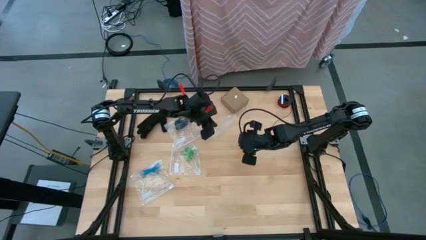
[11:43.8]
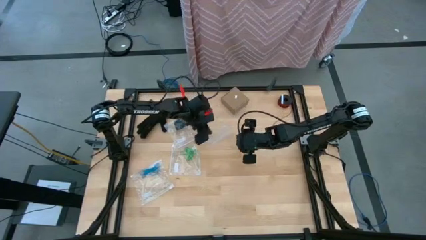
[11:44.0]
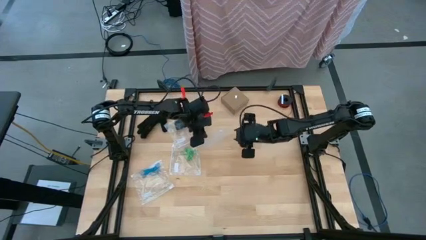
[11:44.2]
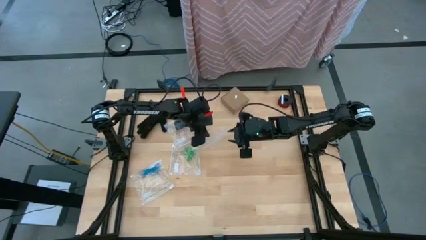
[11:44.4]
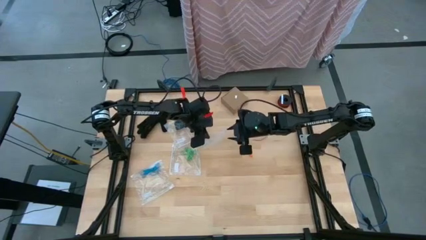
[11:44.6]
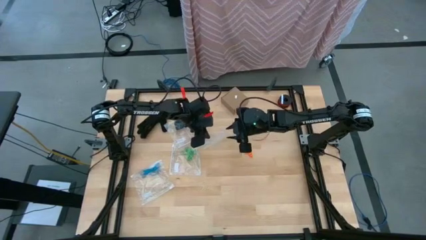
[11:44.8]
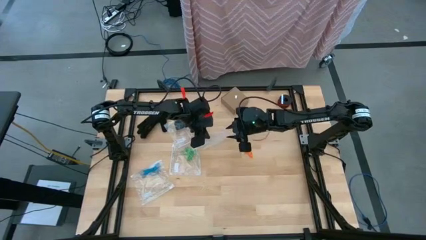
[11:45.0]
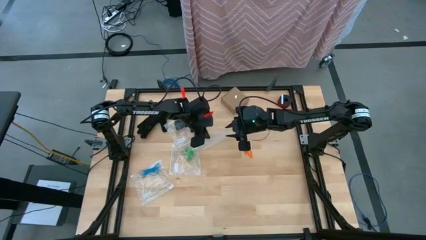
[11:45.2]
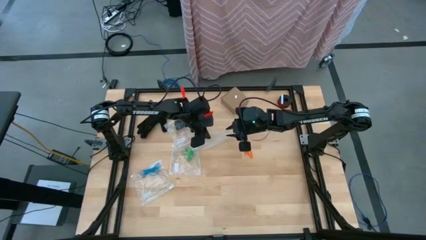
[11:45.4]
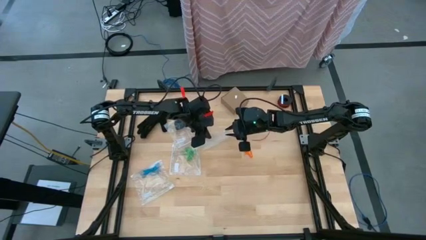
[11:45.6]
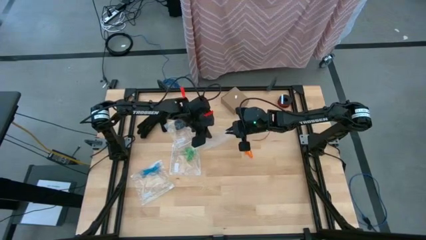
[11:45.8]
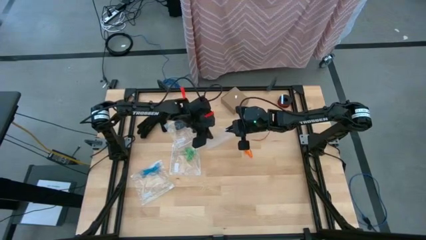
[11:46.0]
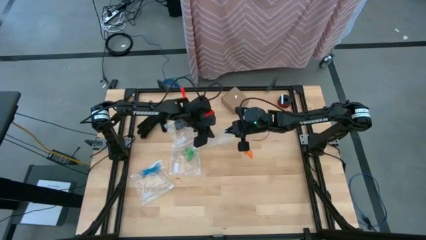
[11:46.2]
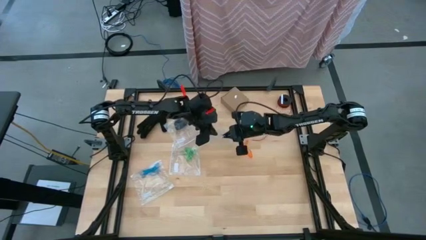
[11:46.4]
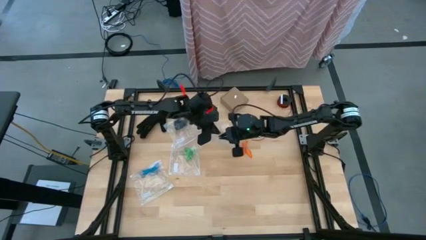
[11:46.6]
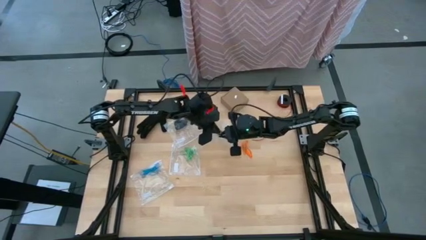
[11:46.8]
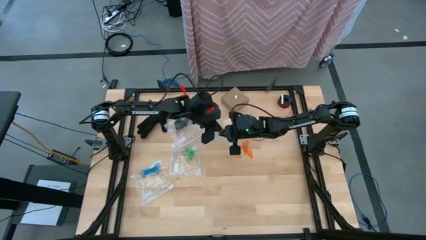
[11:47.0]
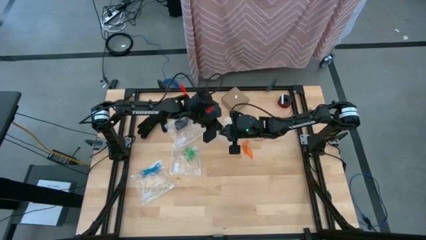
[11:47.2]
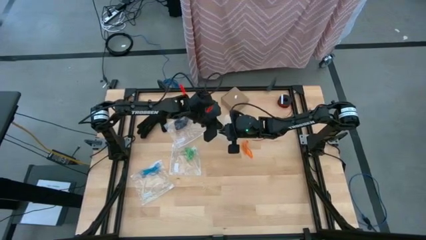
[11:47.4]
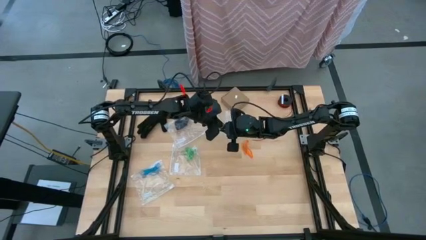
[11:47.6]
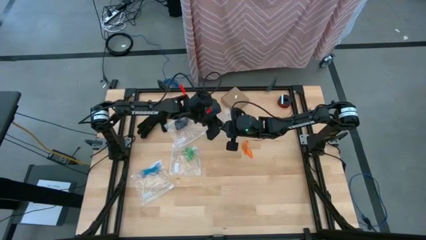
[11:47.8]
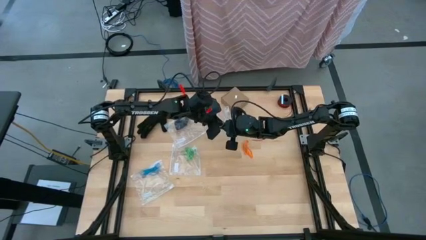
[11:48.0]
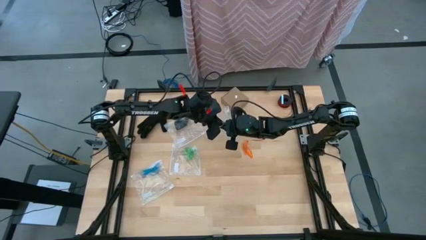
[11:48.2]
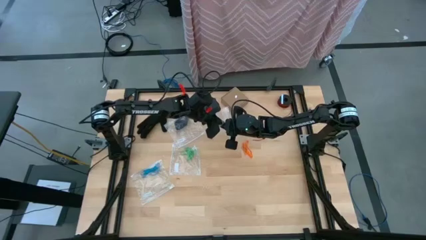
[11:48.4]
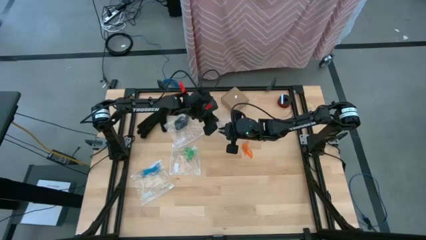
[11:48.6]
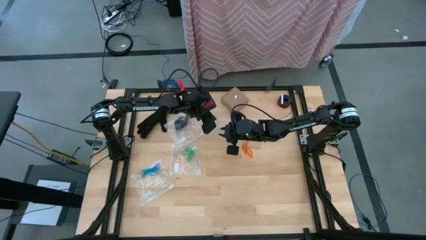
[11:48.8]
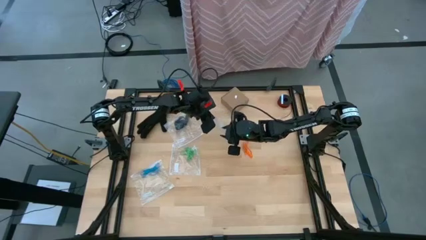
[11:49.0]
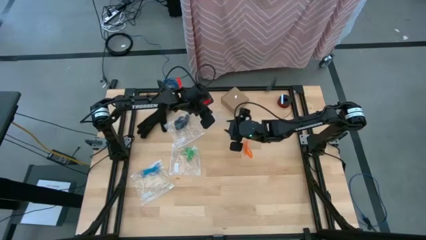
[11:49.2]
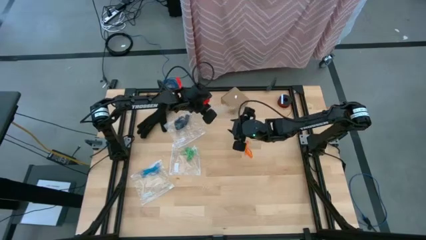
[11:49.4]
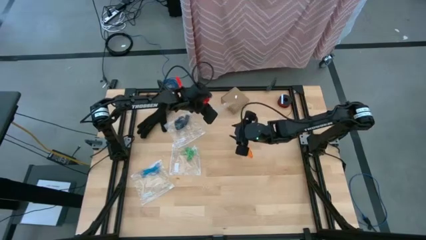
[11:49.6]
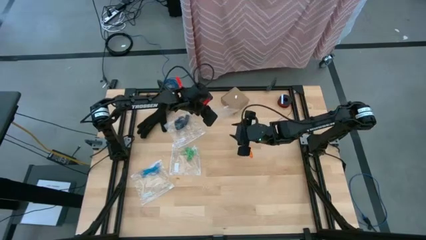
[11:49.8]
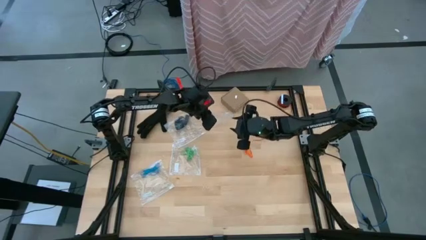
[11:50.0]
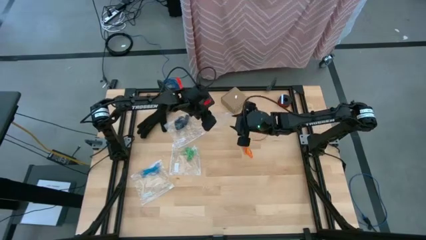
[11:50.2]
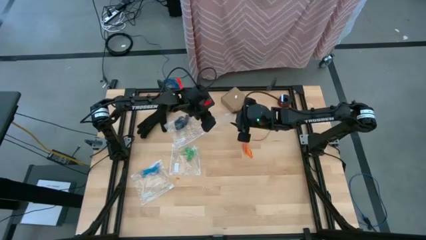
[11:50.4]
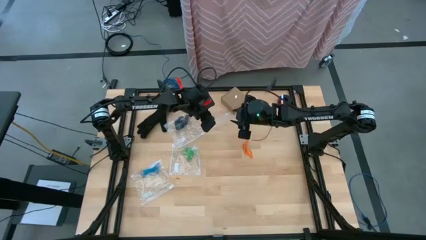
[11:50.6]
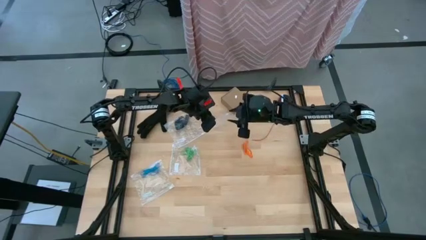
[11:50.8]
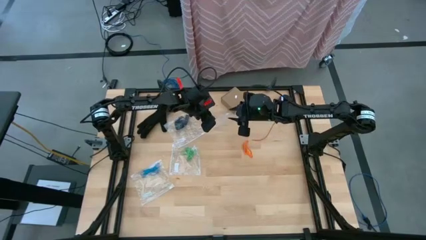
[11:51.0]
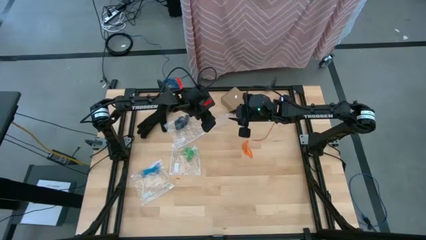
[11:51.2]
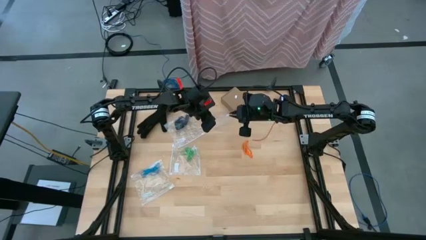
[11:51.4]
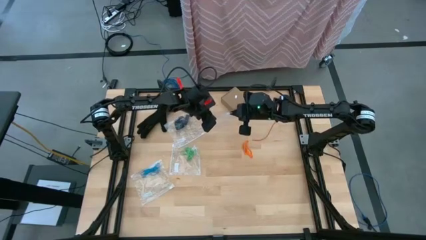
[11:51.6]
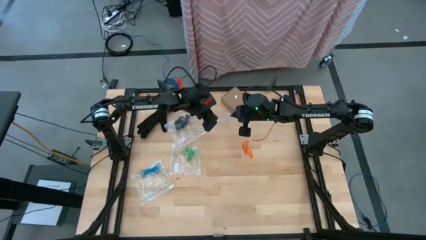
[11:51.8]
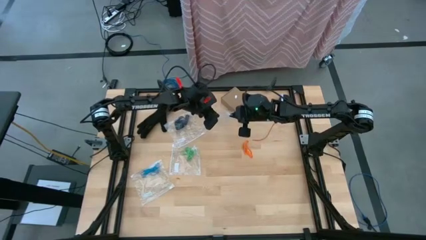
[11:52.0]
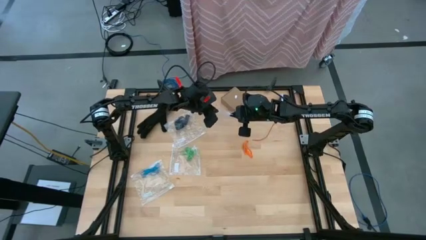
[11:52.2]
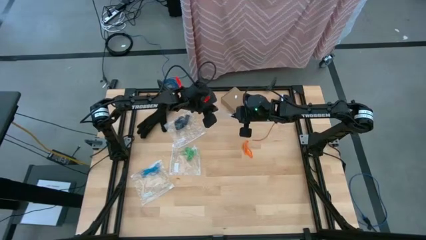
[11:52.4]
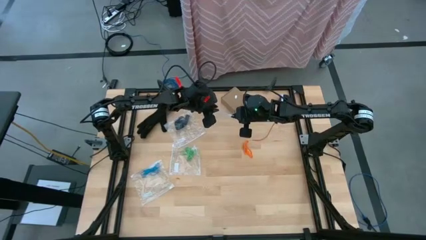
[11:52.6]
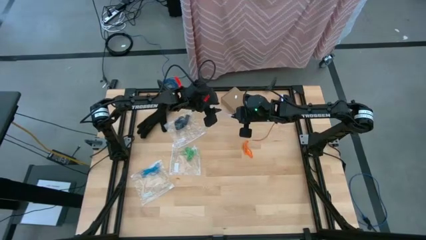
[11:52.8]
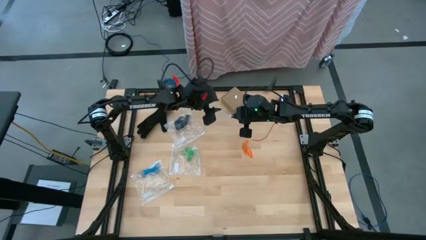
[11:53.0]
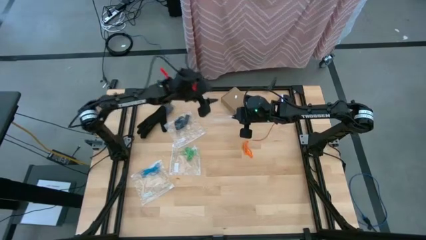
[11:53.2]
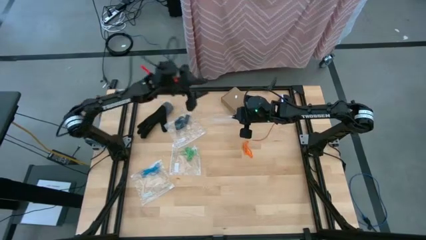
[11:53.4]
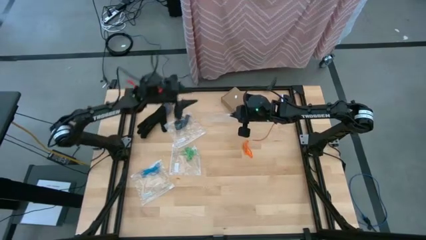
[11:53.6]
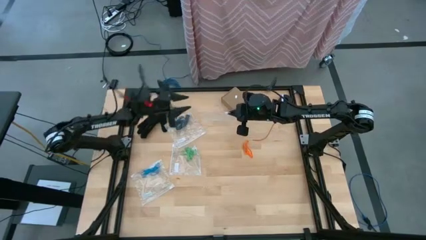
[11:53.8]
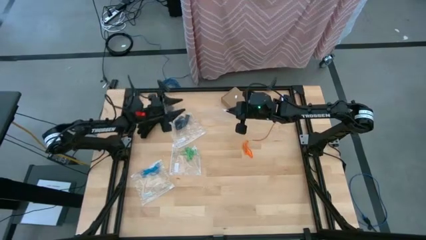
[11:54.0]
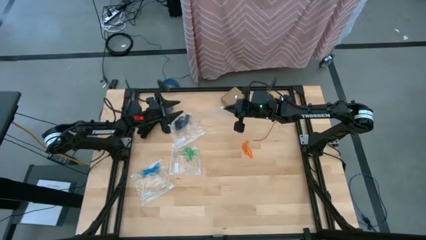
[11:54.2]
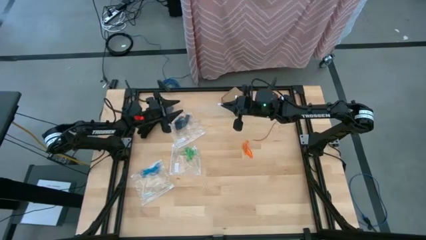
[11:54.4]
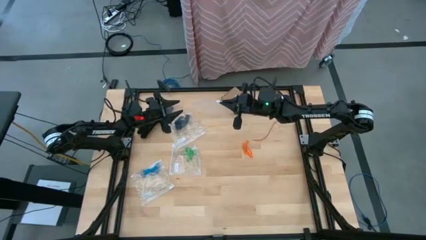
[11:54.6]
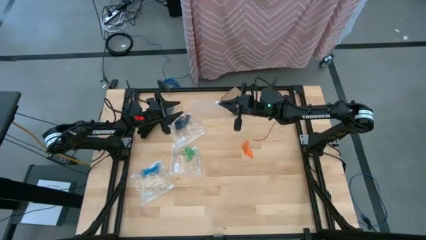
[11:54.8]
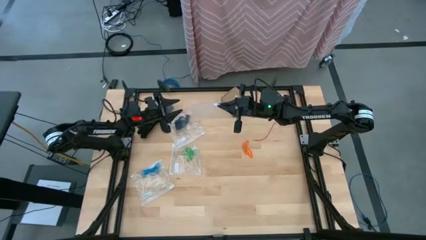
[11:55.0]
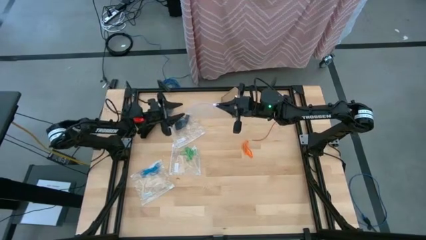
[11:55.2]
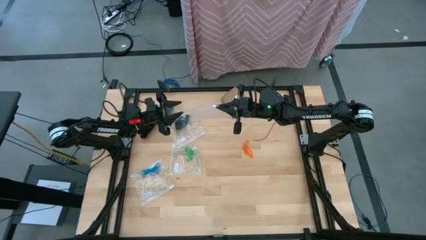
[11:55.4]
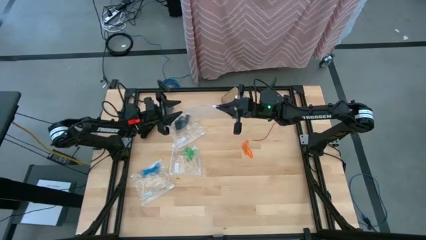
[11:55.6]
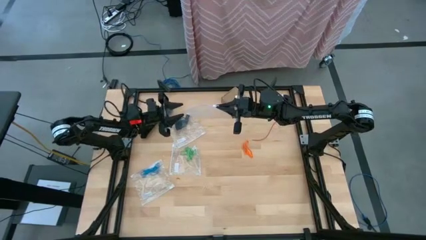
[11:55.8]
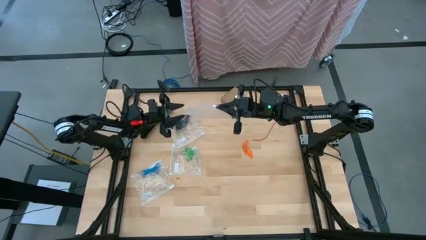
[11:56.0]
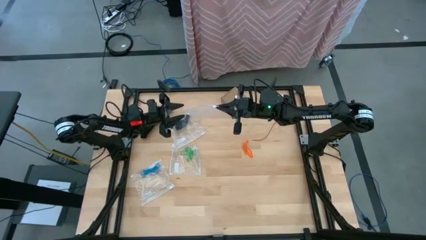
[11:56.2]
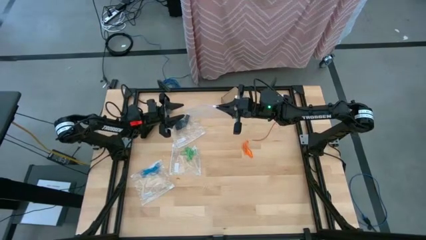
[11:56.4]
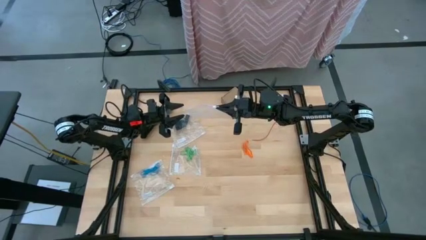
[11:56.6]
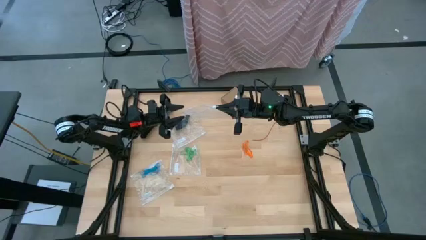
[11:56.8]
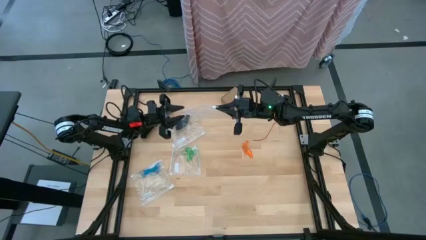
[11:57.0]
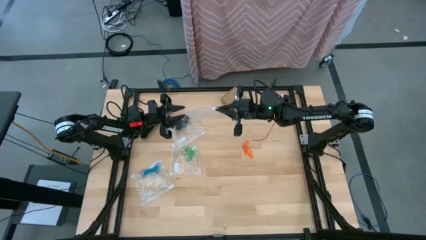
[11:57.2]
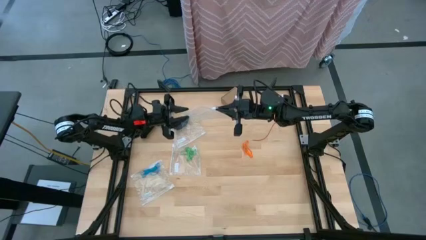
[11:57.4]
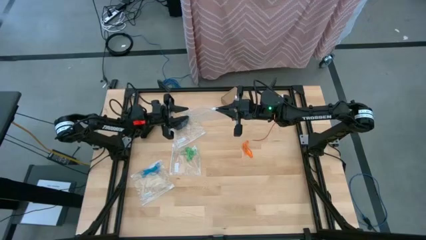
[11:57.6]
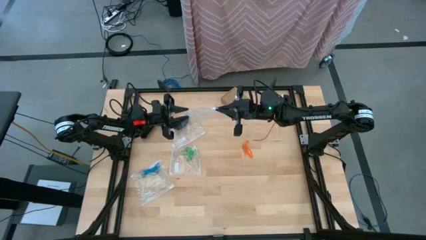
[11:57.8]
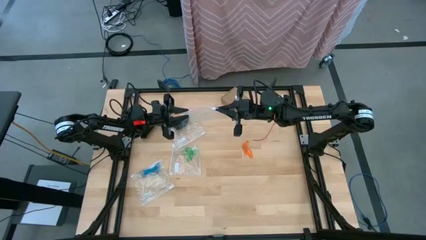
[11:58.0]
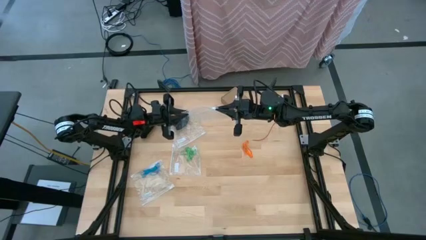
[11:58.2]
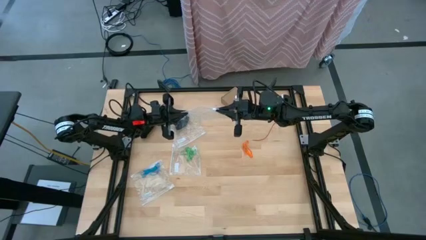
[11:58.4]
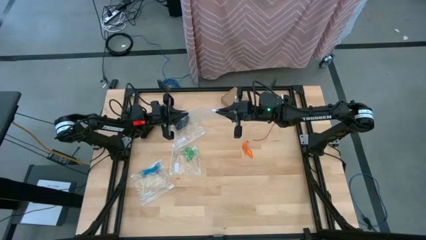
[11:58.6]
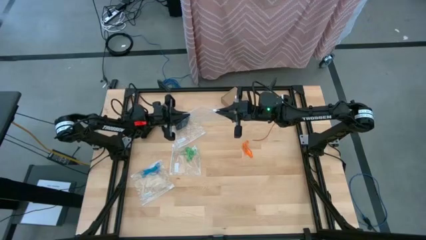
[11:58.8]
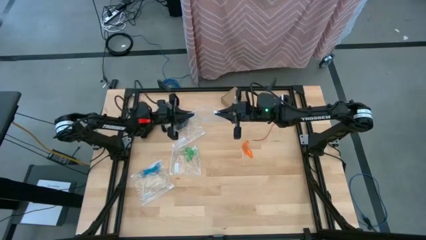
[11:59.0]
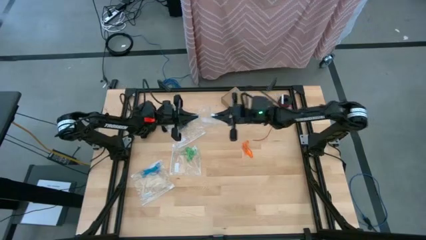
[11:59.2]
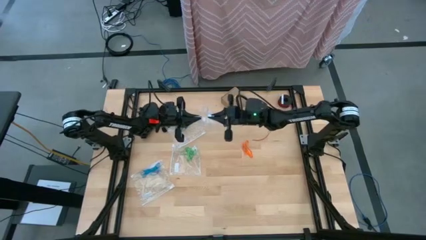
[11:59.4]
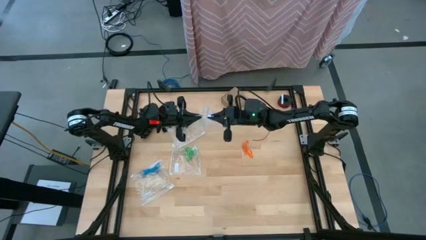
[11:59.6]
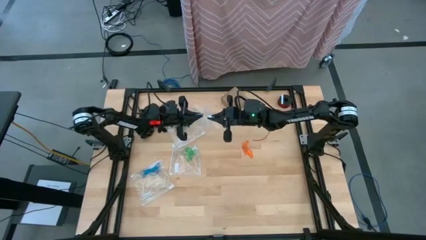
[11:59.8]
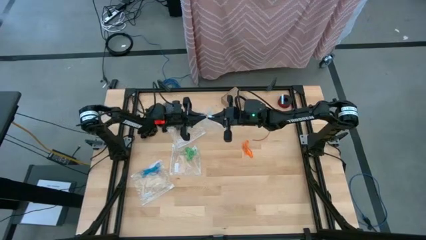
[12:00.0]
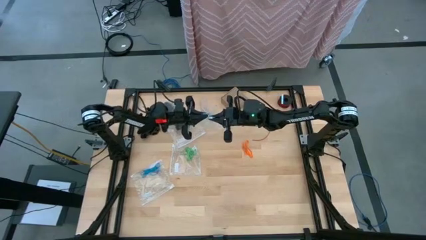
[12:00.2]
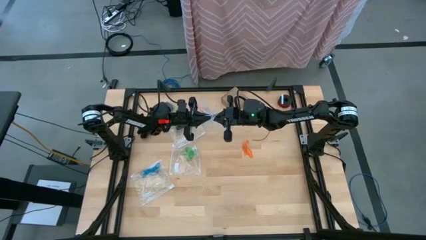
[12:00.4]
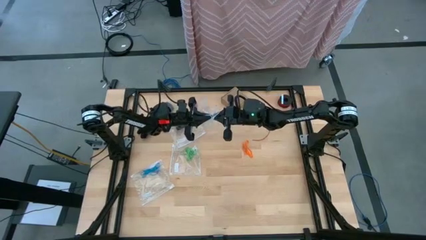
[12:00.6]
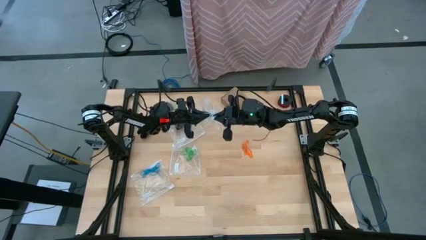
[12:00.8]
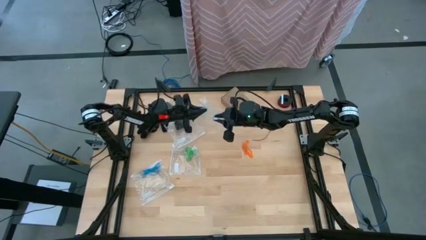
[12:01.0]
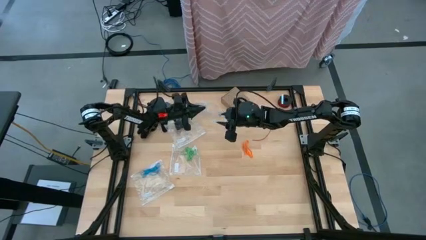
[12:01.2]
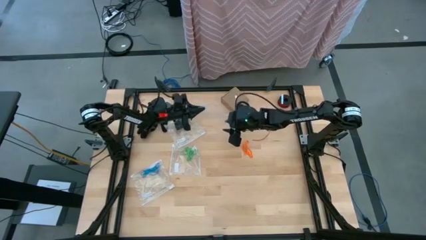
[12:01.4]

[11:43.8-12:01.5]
Task: Sort rubber bands
Open the transparent zip bag
